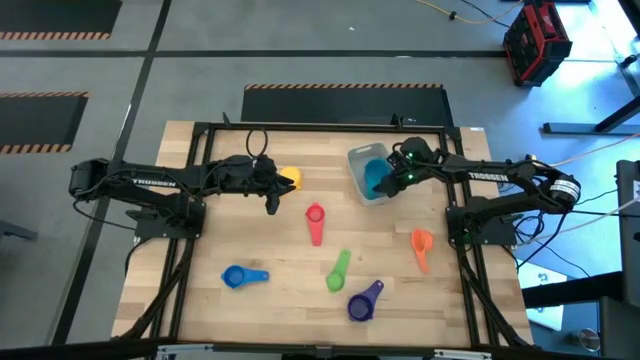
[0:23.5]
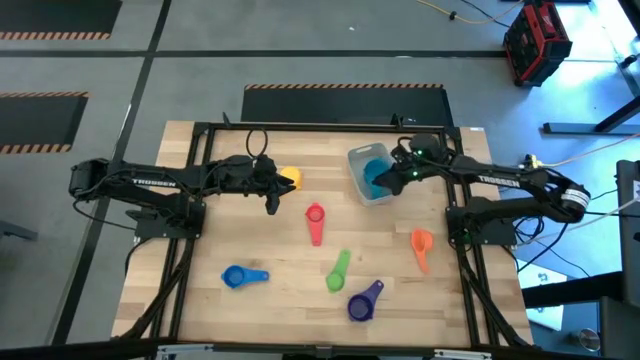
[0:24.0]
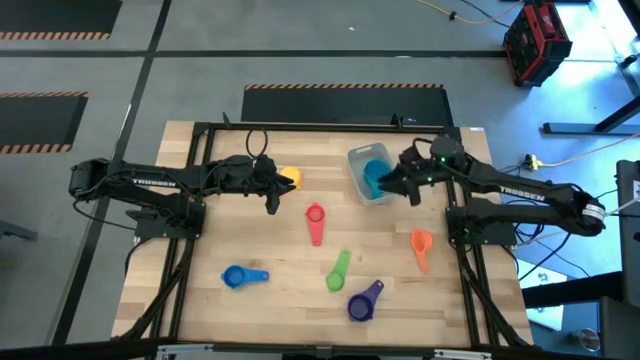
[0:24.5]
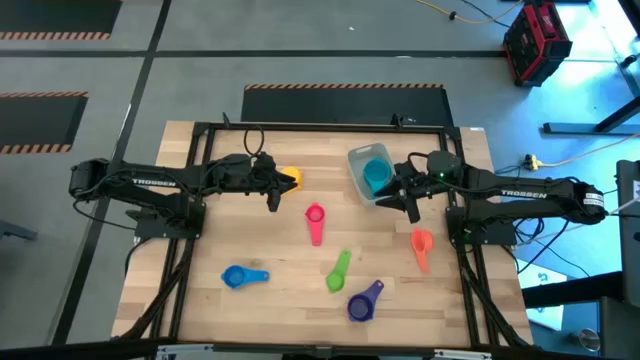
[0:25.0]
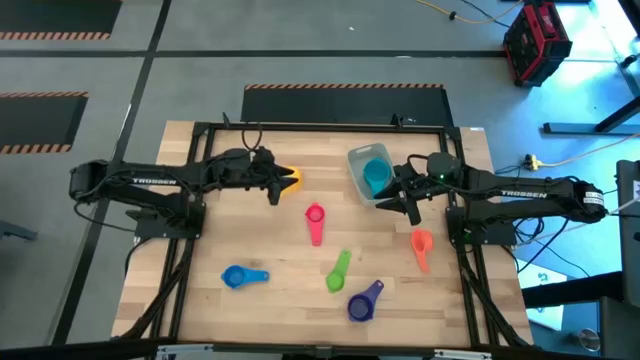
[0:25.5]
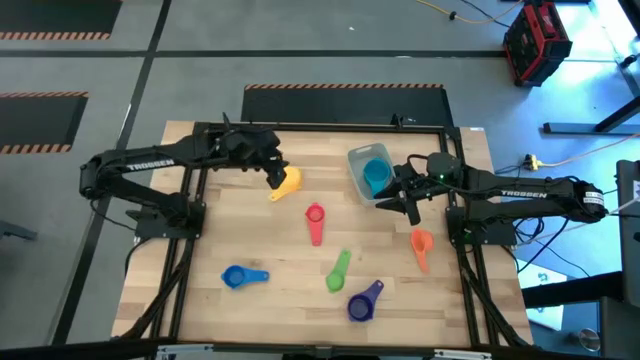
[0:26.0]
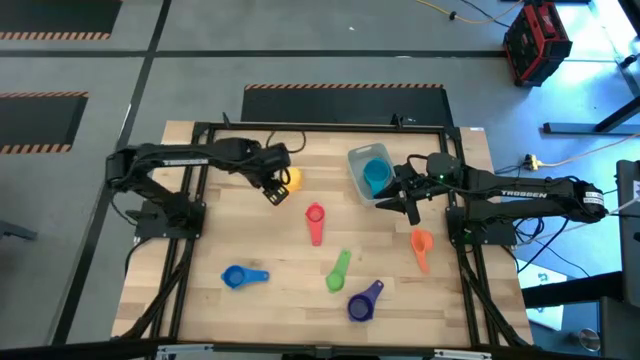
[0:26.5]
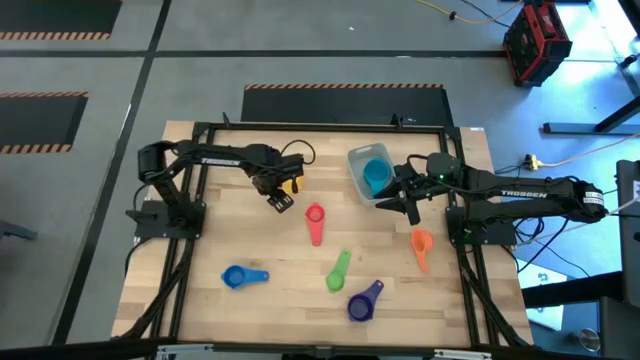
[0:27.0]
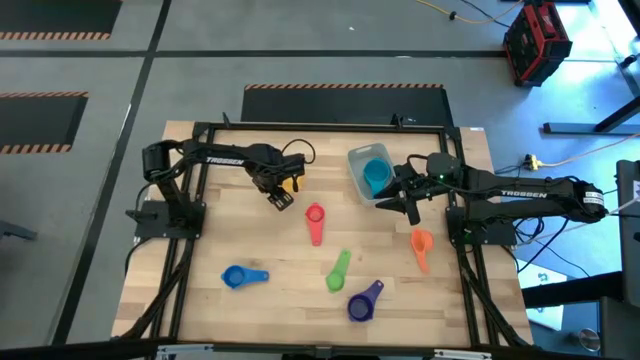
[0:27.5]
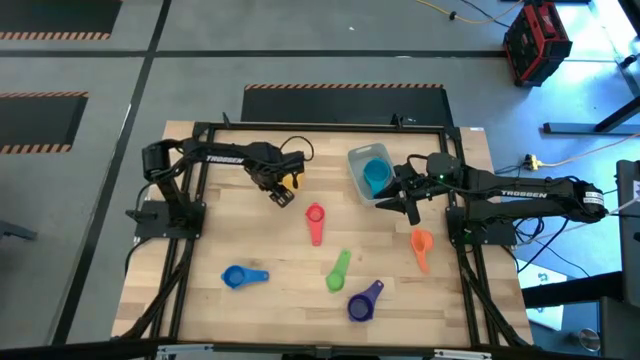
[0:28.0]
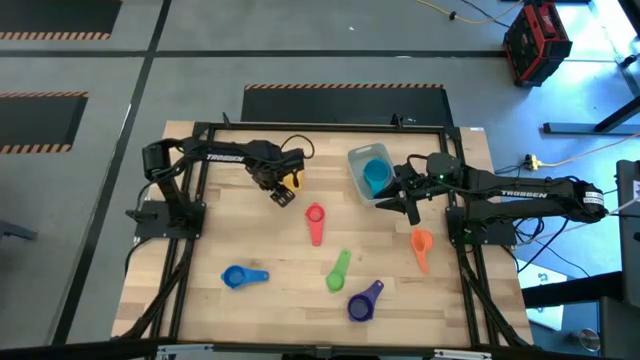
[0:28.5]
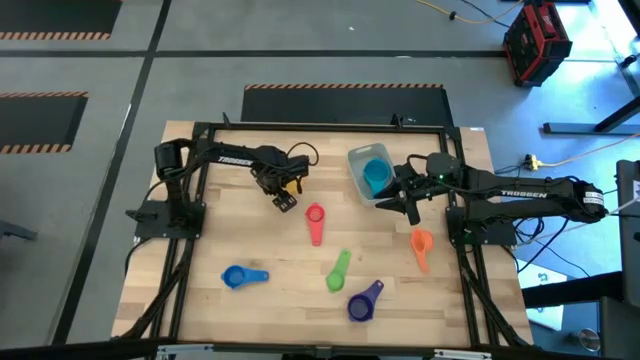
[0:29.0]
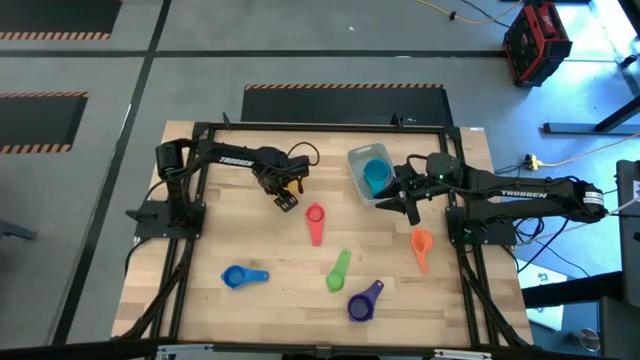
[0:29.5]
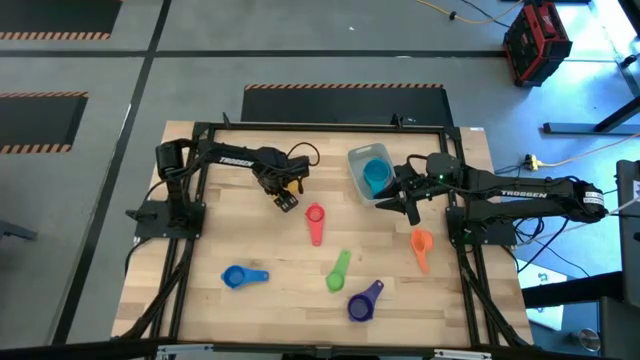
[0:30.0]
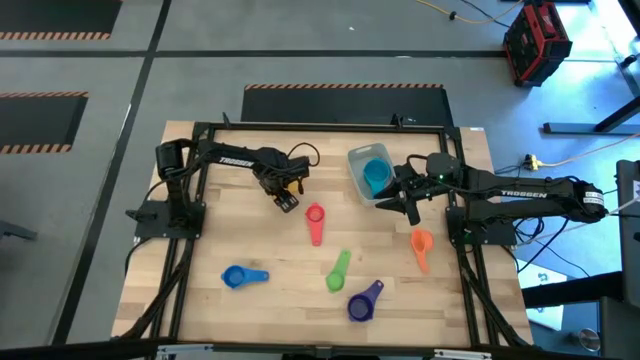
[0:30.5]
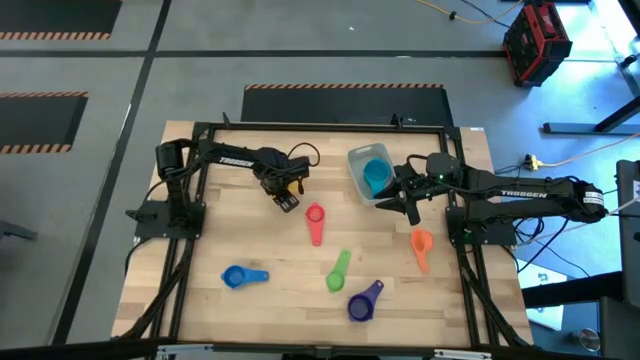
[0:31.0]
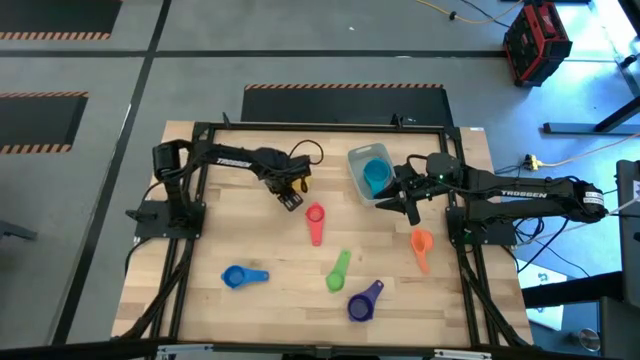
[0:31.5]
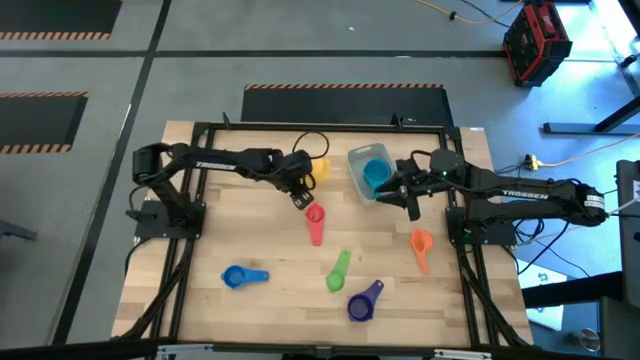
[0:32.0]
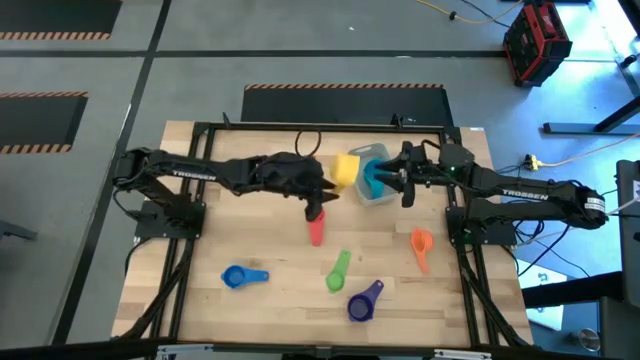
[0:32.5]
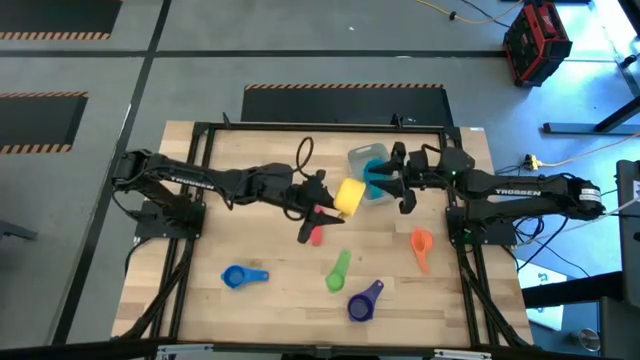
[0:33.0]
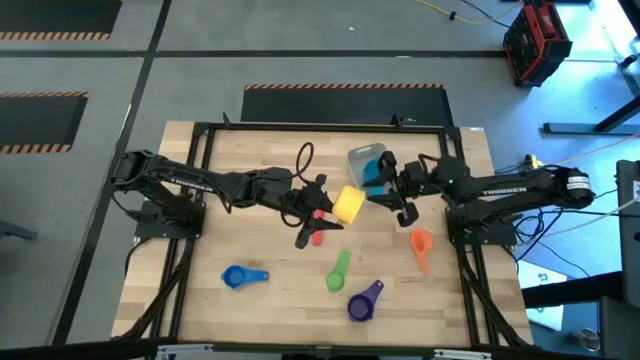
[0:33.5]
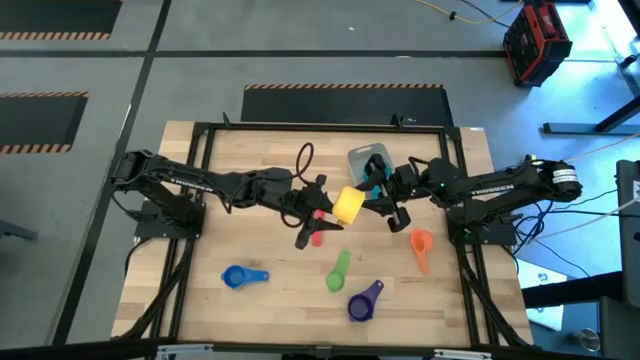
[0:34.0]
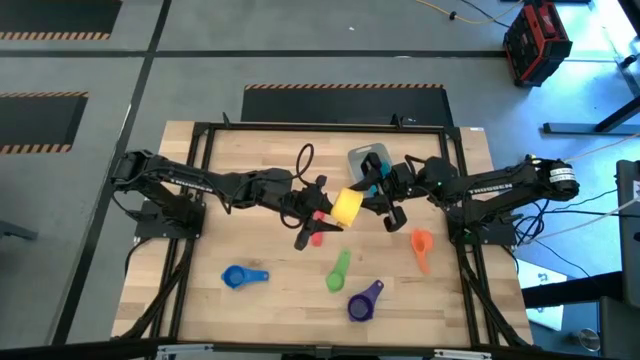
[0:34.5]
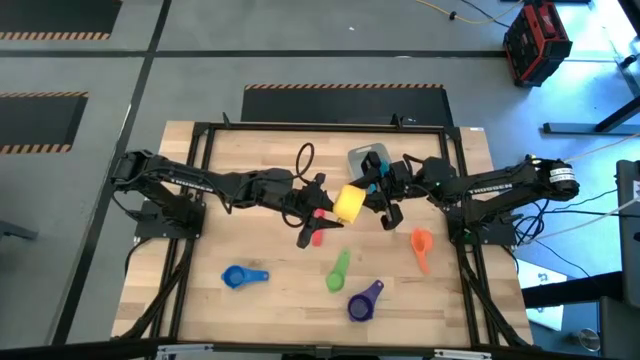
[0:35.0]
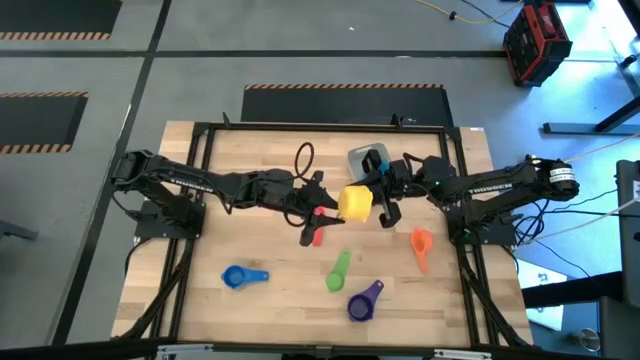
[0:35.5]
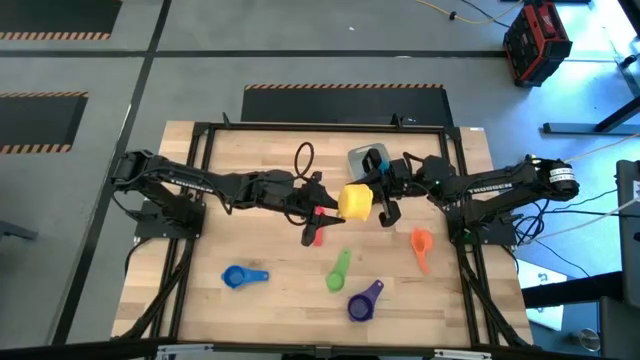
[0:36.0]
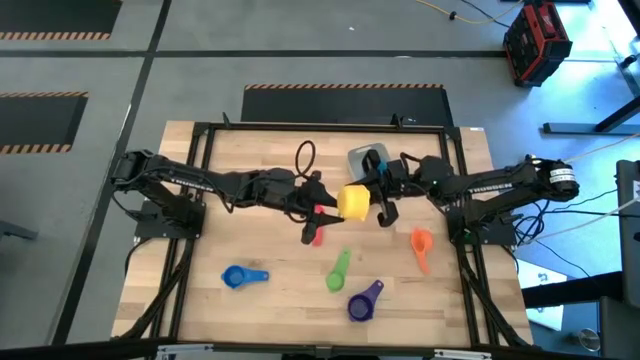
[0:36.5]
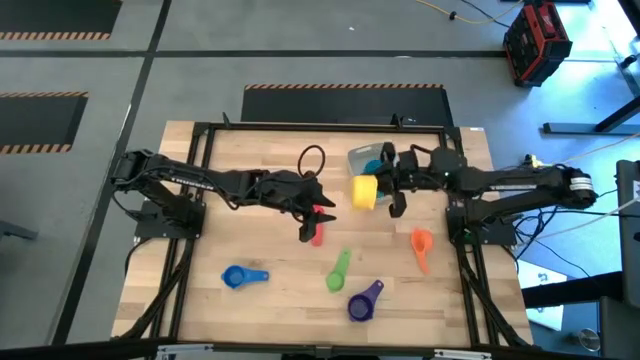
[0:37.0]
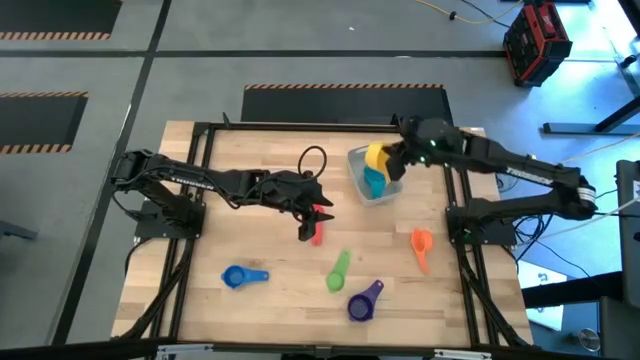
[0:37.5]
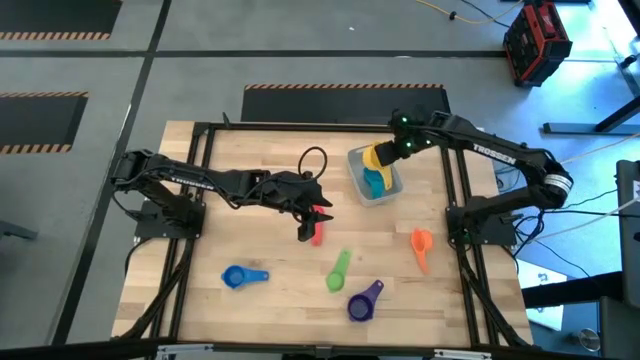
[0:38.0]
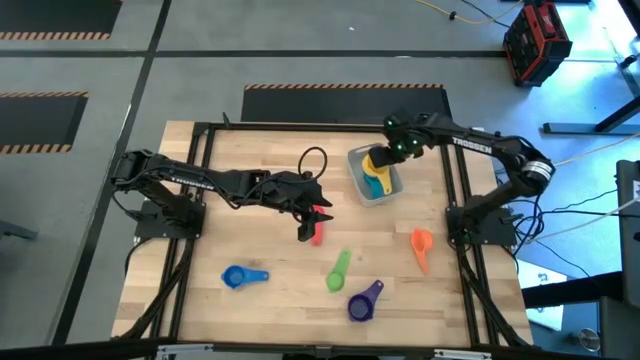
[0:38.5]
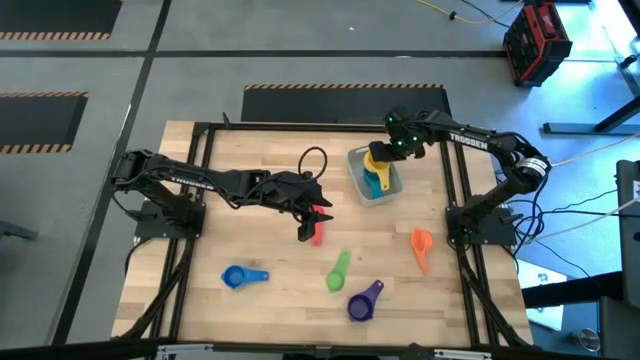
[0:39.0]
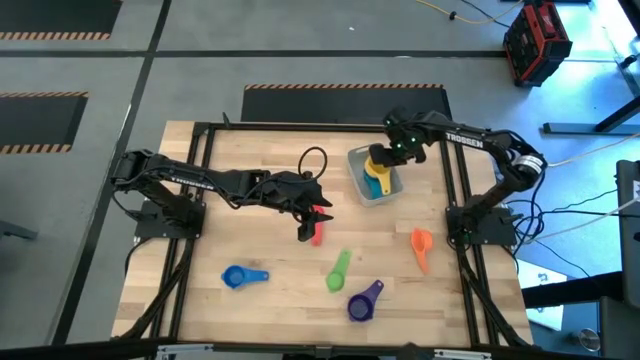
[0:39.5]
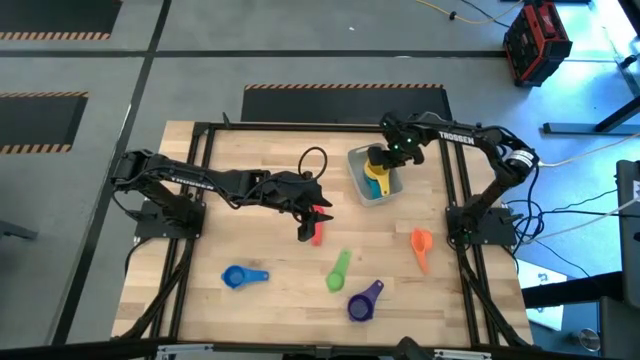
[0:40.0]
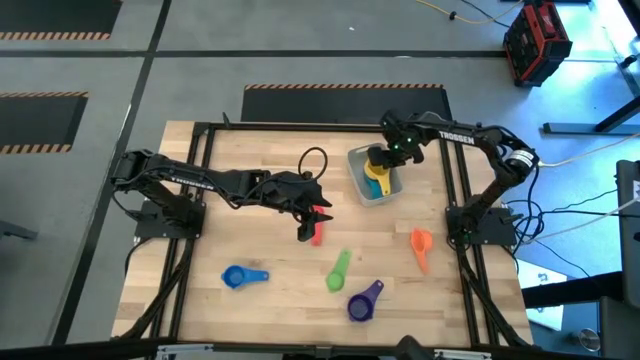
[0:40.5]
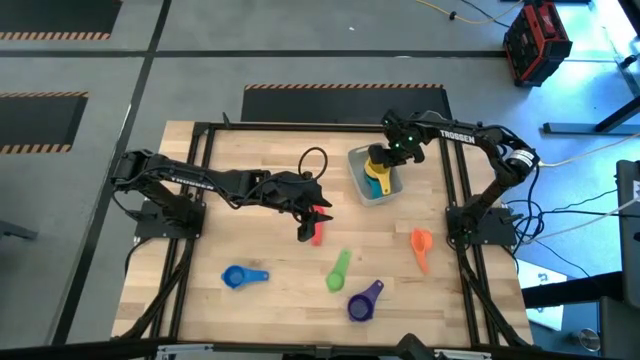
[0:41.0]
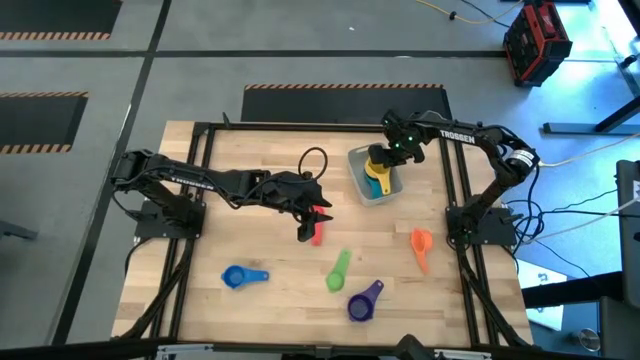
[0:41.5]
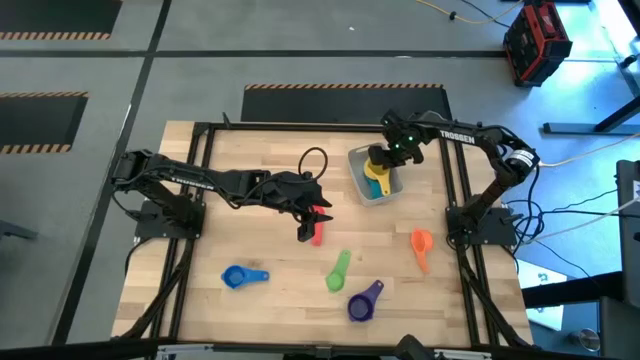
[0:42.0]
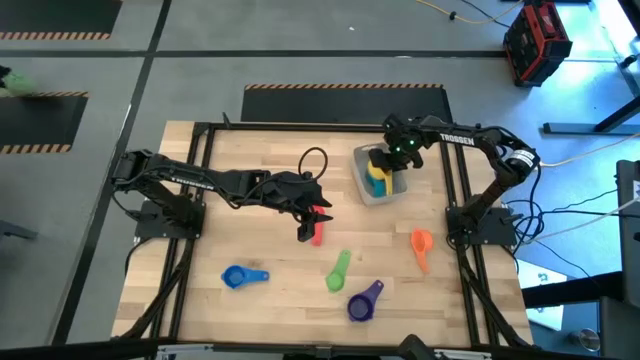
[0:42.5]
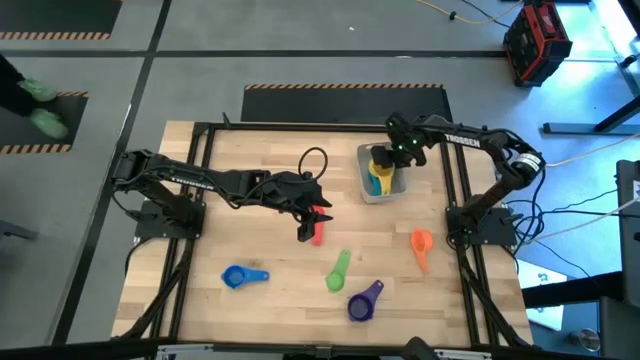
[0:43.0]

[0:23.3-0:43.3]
Task: Nest measuring cups in basket
Stack the yellow measuring cup on top of the light blue measuring cup in the grey bin

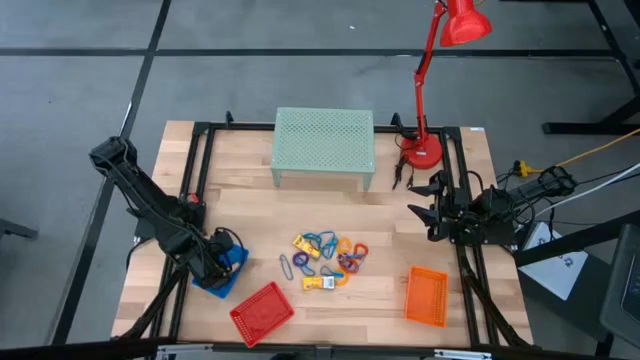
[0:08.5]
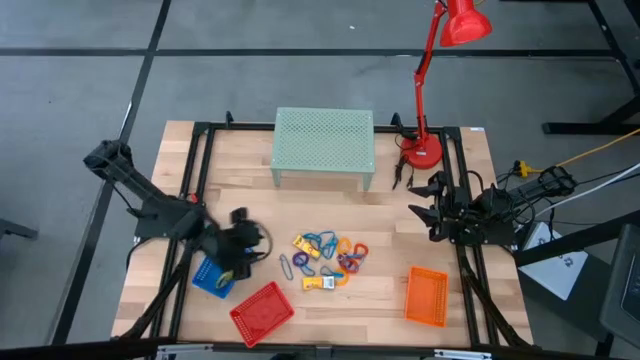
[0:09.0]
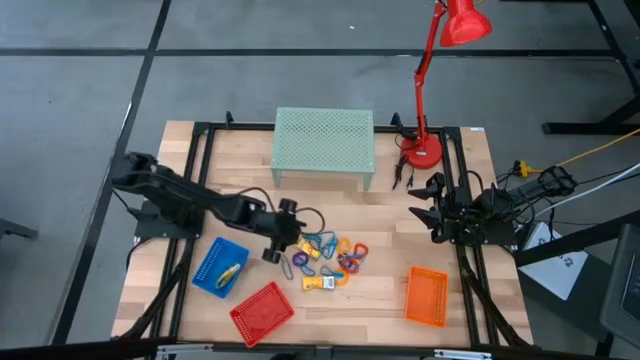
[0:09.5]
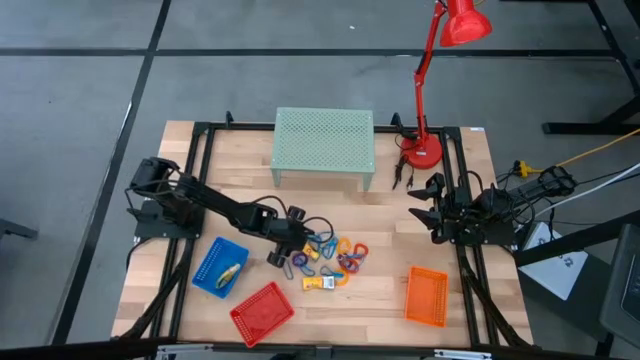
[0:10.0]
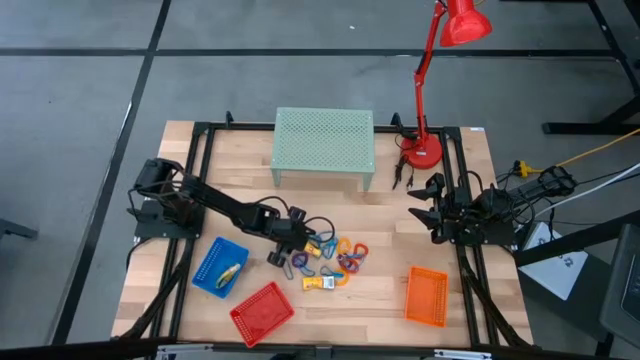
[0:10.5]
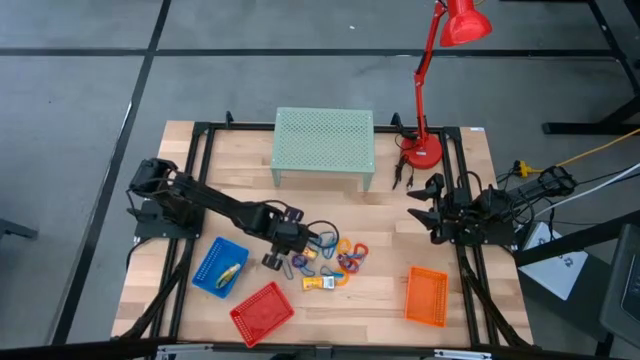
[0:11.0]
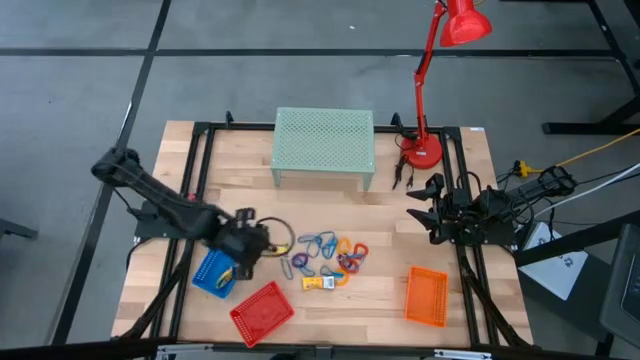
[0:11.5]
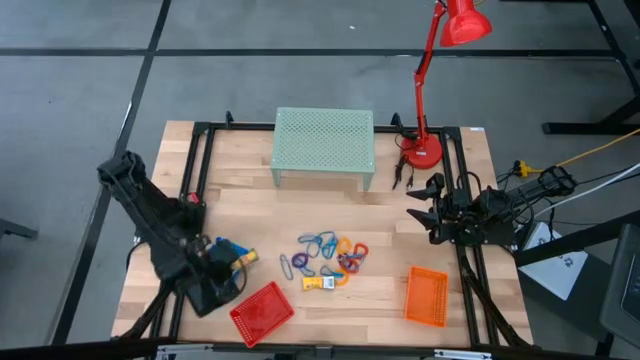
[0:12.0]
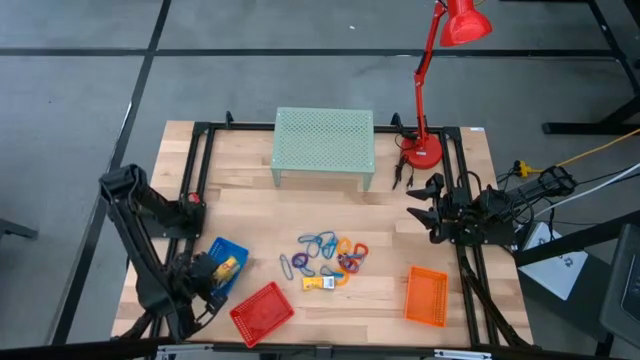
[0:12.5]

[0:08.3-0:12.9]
Task: Pick & Place Office Desk Supplies
Put the yellow crayon pack into the blue bin
